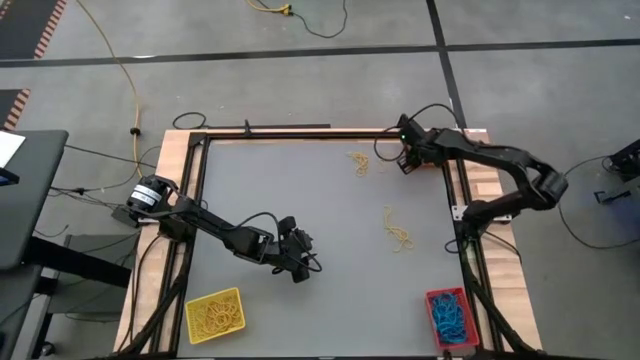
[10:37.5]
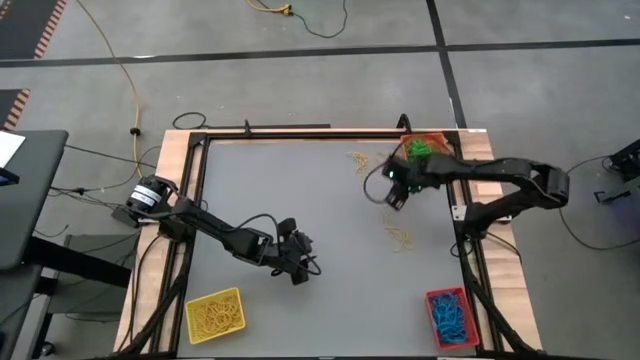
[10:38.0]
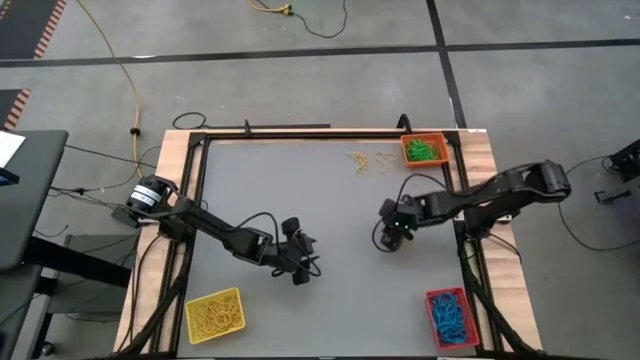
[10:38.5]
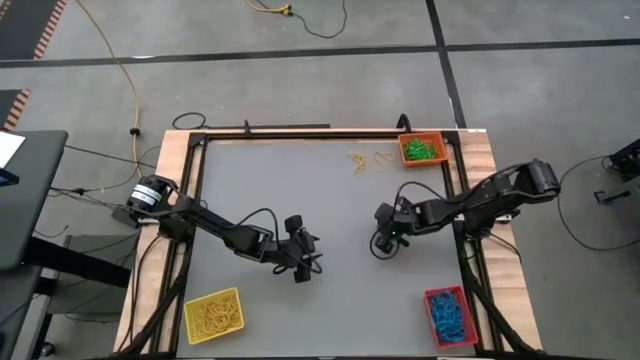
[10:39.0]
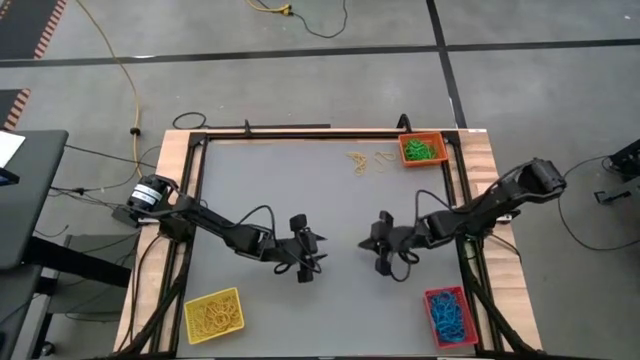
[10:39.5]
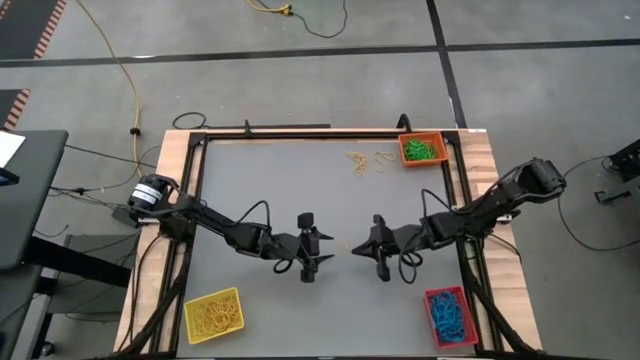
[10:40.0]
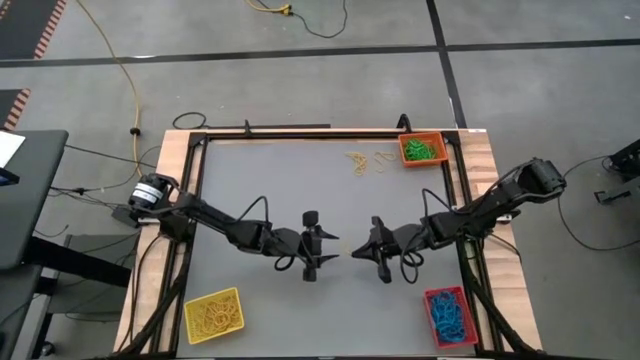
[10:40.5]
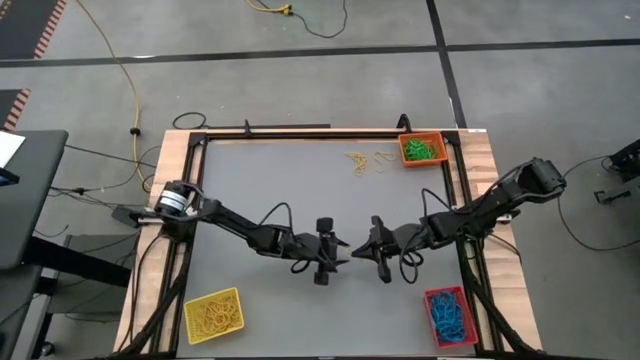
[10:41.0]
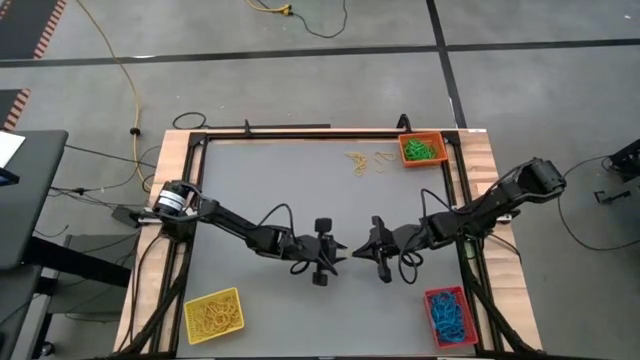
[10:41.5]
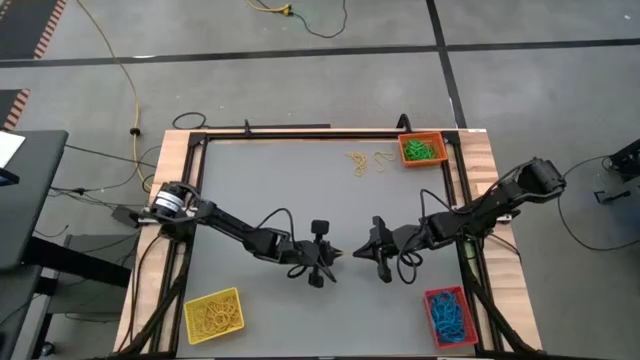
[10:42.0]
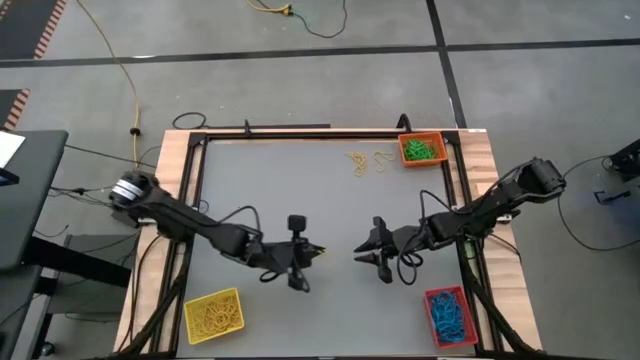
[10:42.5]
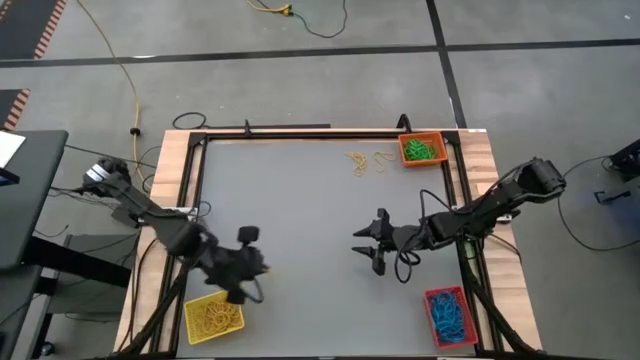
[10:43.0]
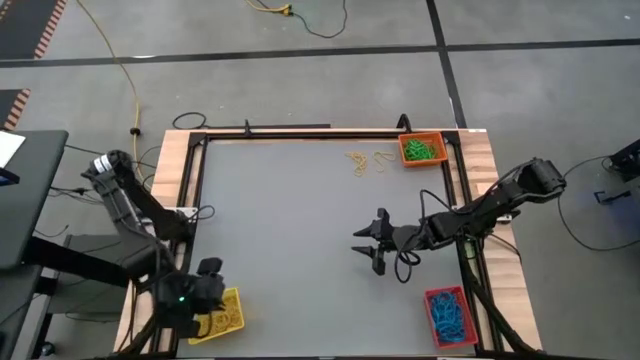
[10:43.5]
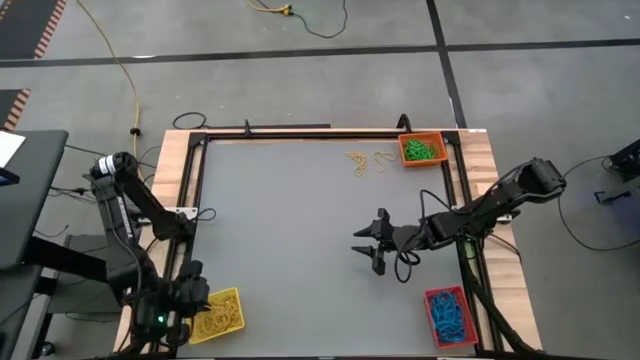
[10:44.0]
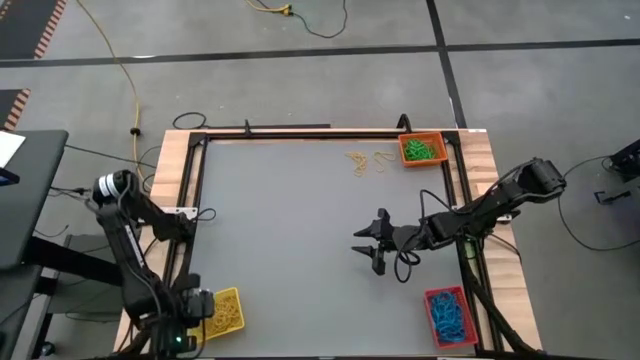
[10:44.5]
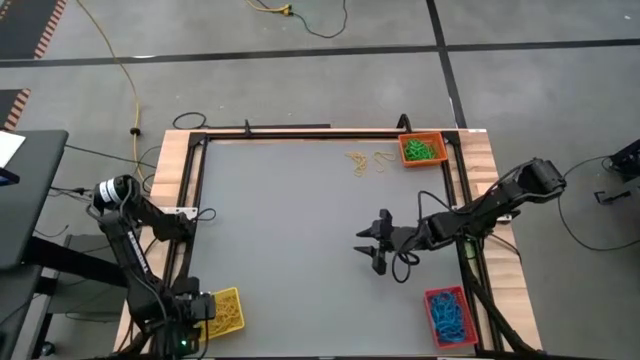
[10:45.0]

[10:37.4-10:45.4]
Task: Sort rubber bands into baskets
Put the yellow rubber band into the yellow bin

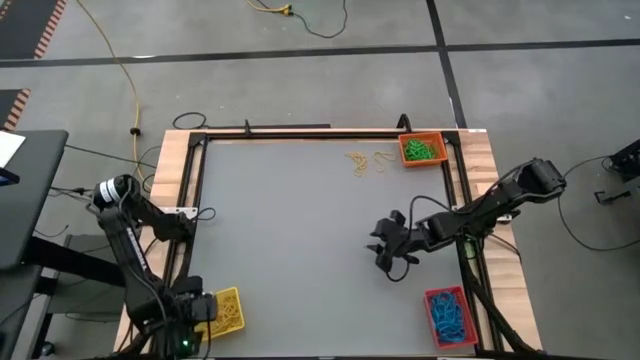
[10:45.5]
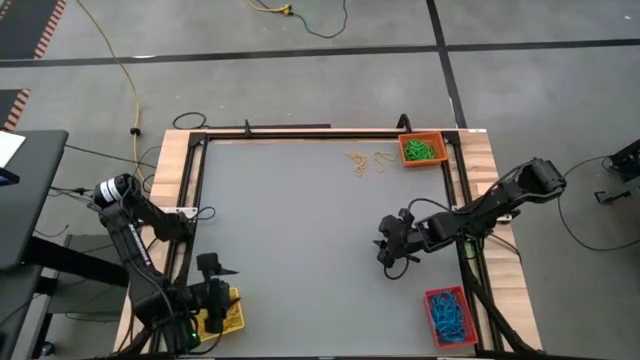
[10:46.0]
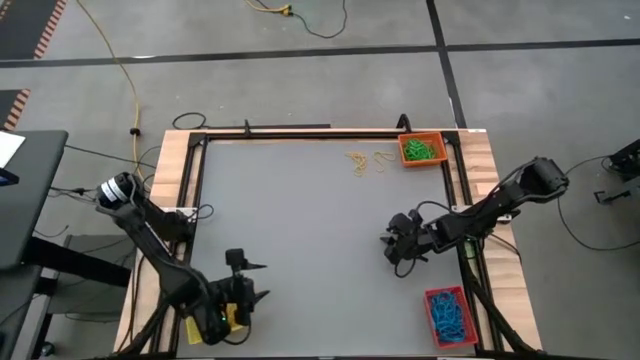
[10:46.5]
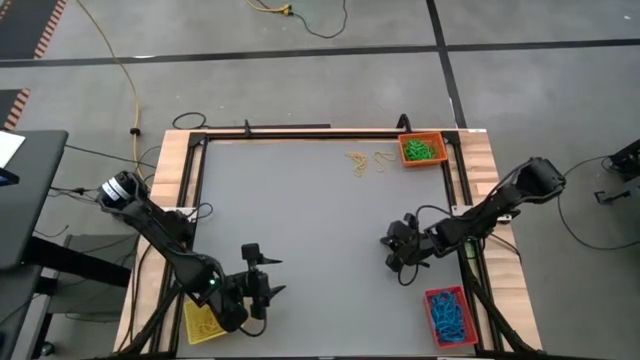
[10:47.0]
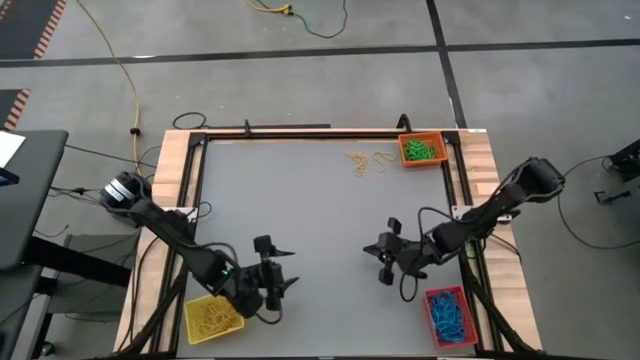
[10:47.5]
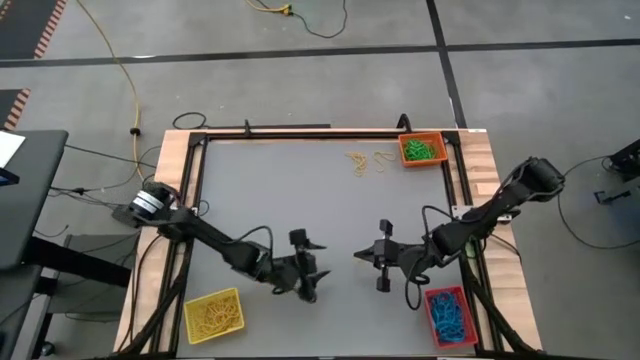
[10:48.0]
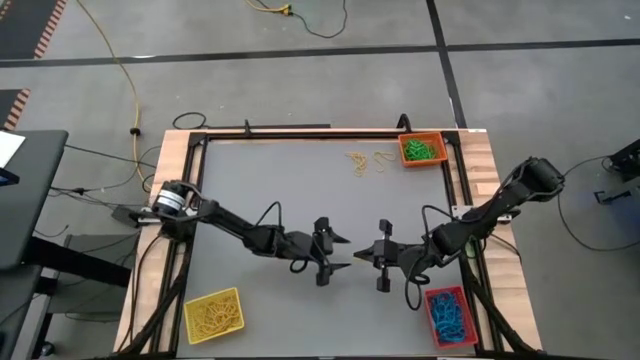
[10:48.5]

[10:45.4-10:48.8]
Put the yellow rubber band into the yellow bin

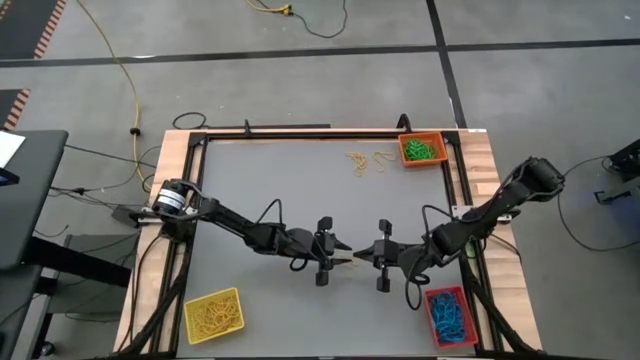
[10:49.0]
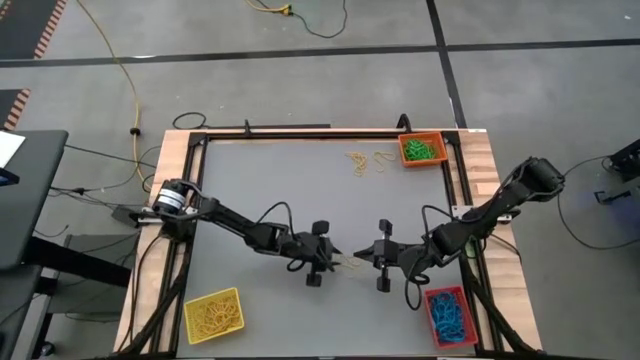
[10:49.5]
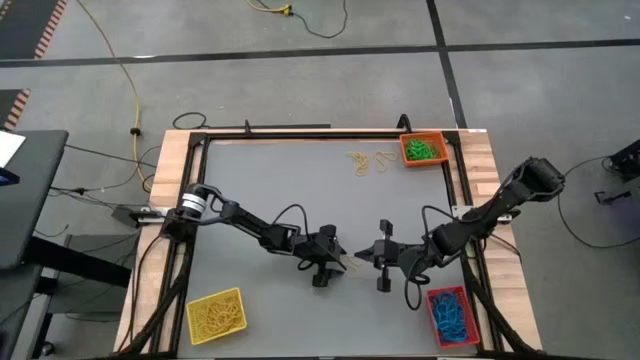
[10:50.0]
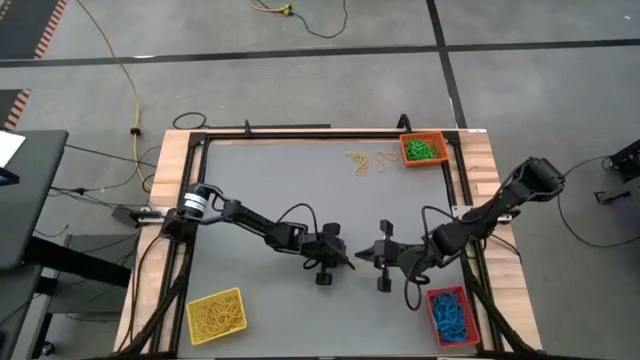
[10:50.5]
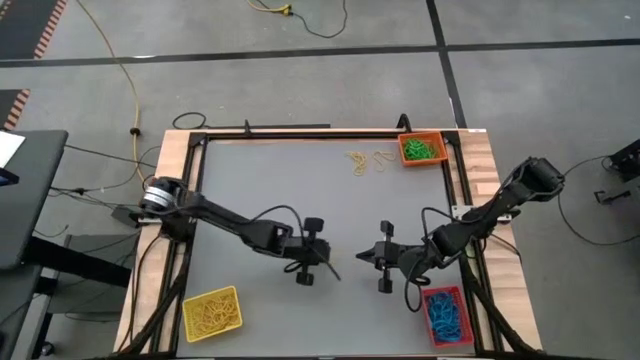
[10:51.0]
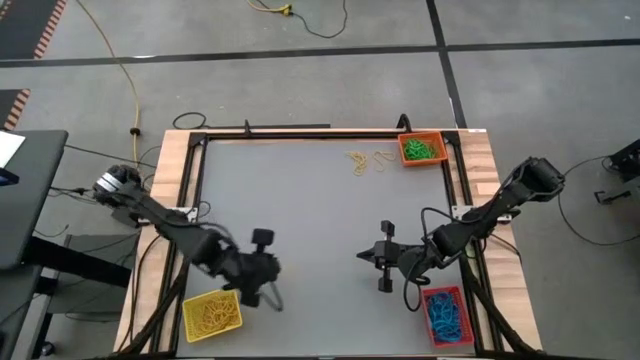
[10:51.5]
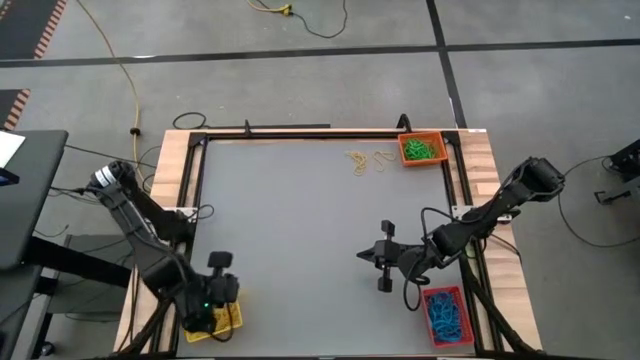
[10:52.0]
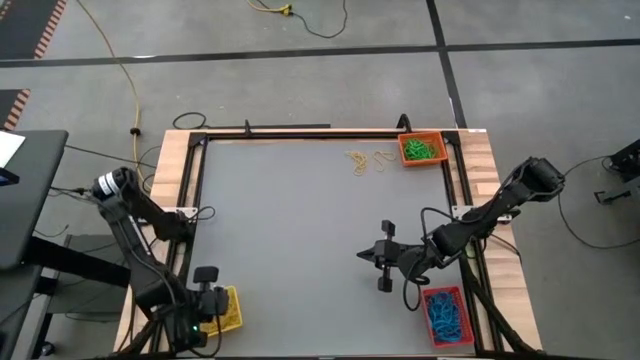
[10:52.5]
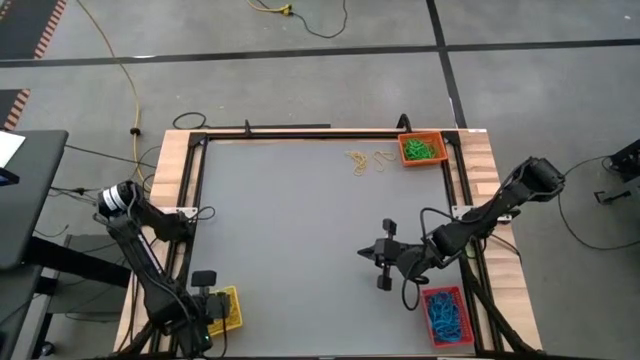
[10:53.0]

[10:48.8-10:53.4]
Put the yellow rubber band into the yellow bin

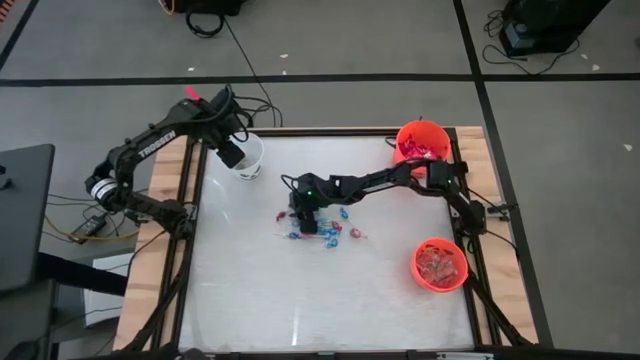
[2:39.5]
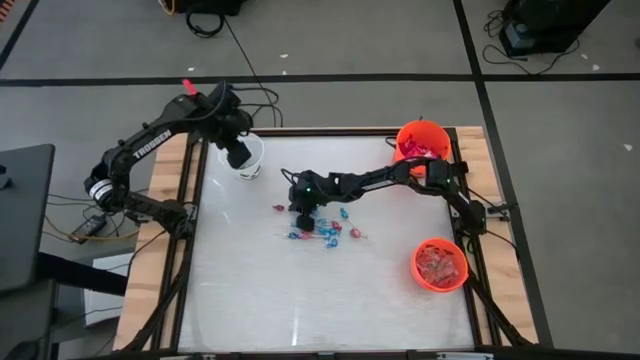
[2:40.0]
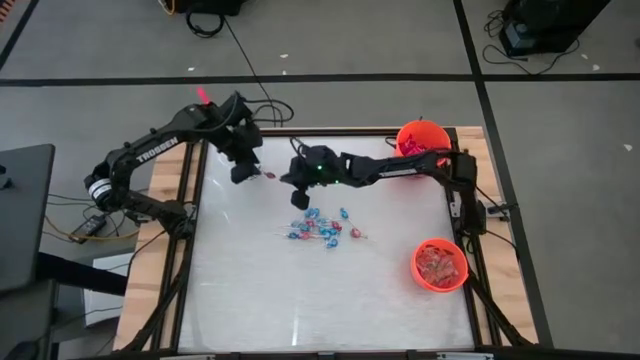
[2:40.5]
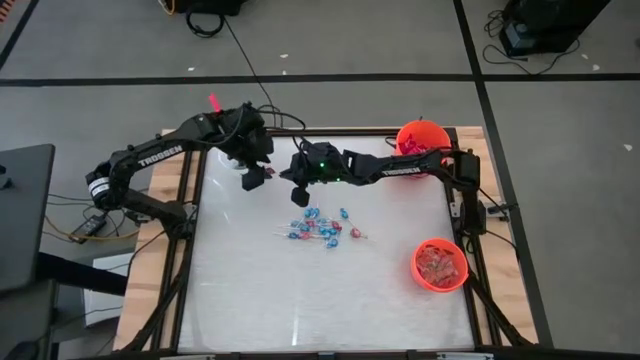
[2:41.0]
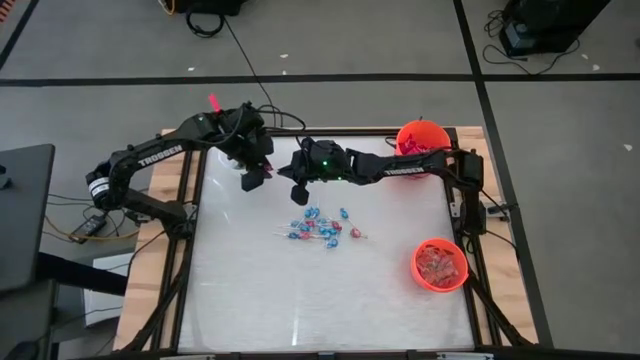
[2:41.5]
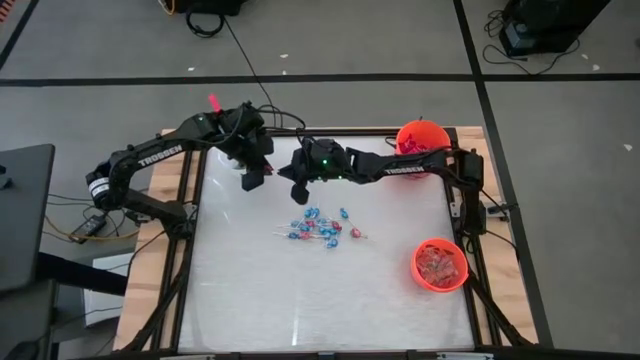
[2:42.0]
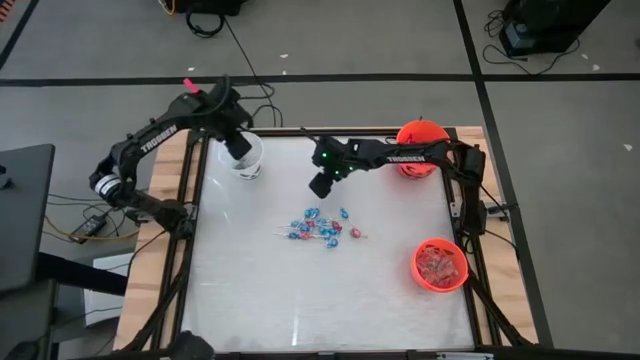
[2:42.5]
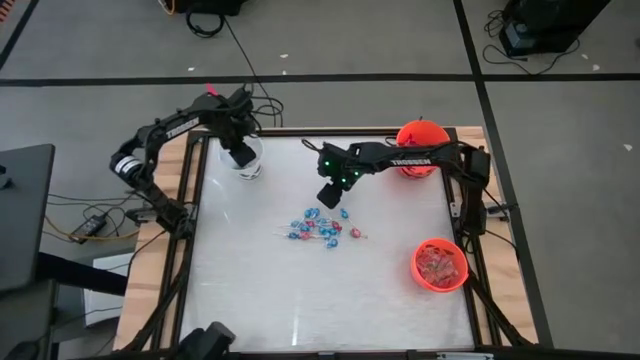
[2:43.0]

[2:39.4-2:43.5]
Task: Sort candy by brand, put in halloween buckets
Put the red candy into the white bucket
